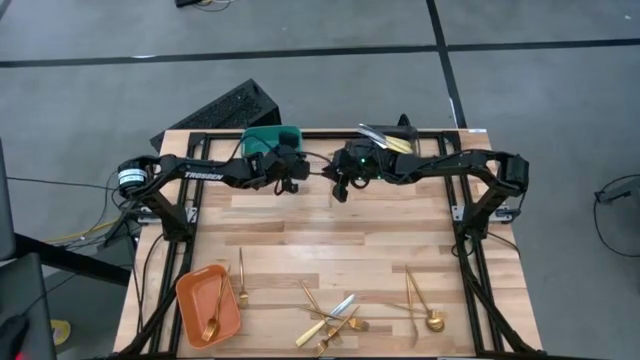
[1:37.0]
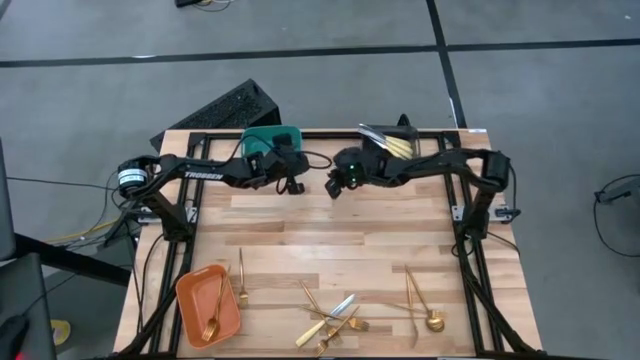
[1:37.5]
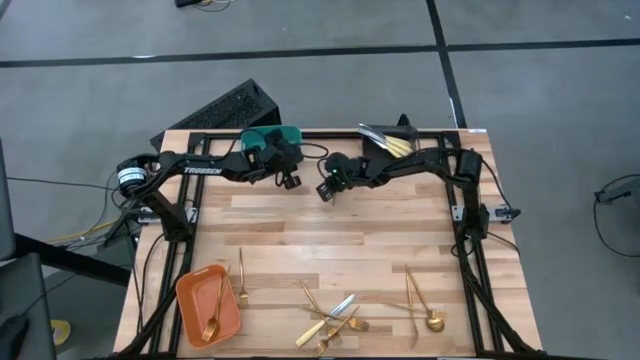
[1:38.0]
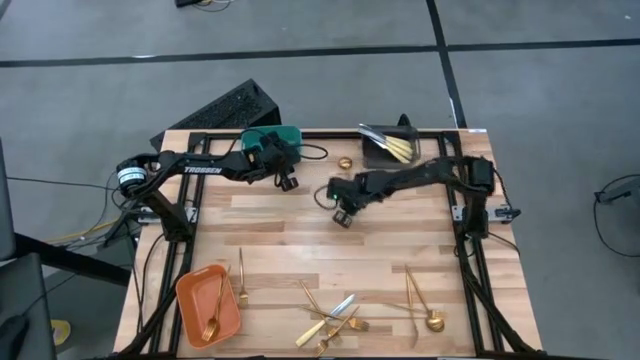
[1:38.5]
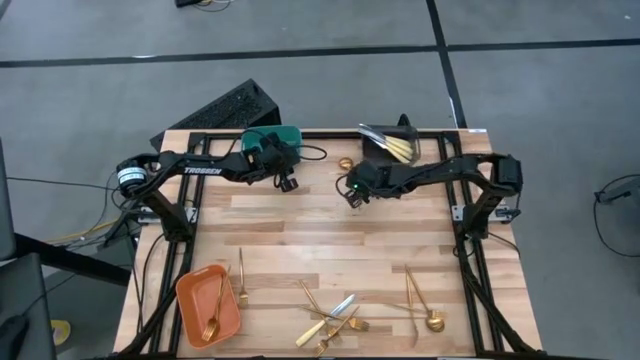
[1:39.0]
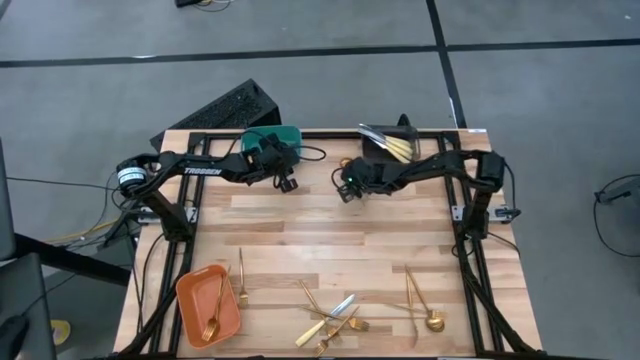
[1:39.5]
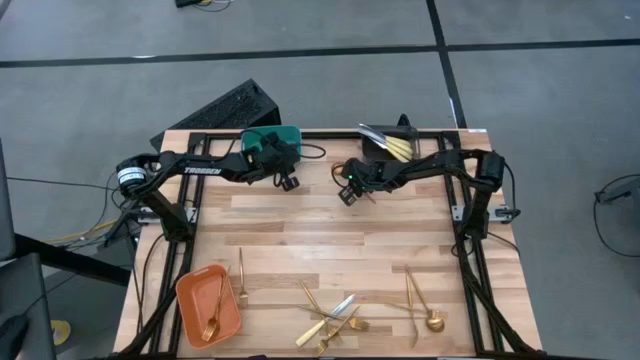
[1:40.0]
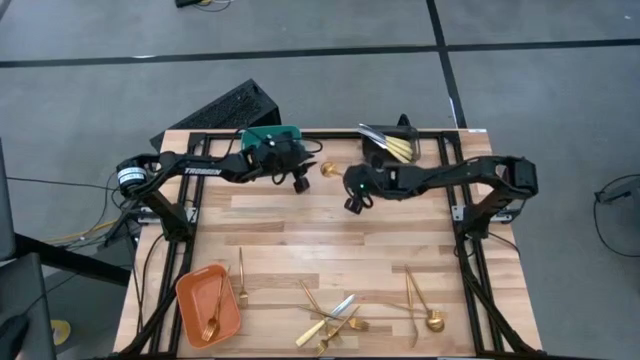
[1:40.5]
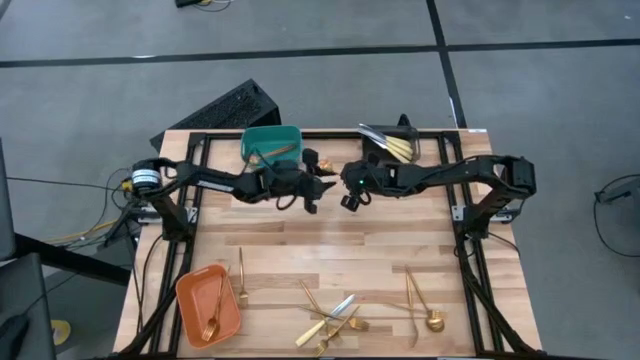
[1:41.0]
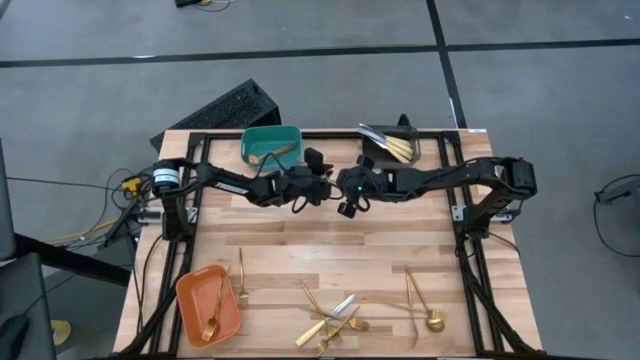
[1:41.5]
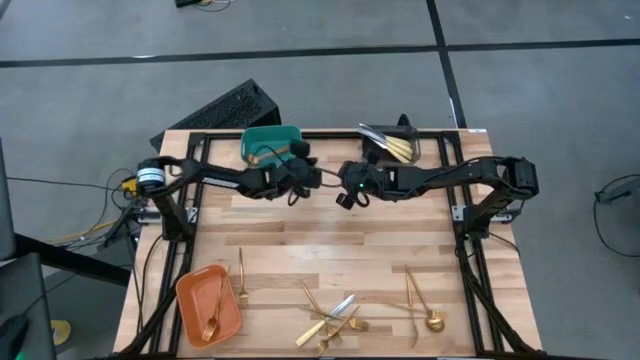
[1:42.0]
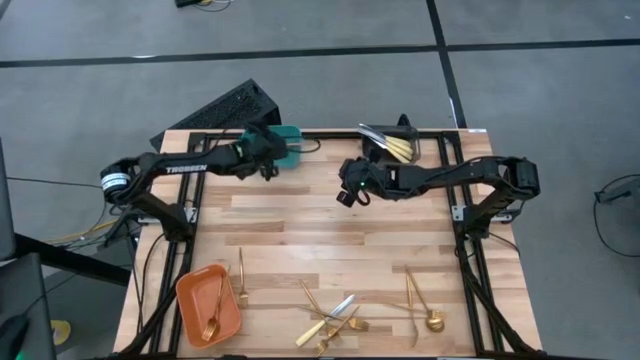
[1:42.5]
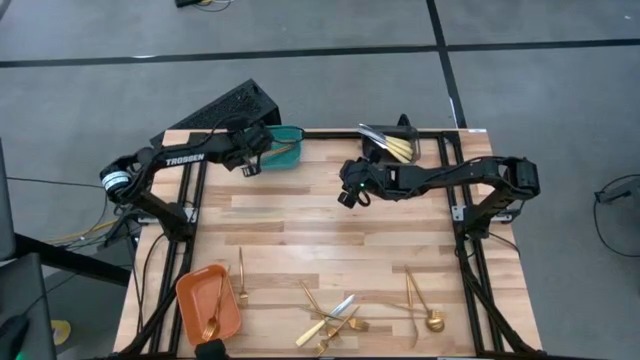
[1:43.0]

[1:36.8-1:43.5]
Task: Sort silverware by color (type)
Put the gold spoon into the green bin

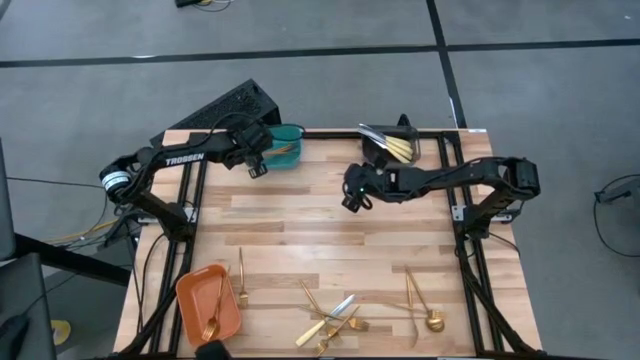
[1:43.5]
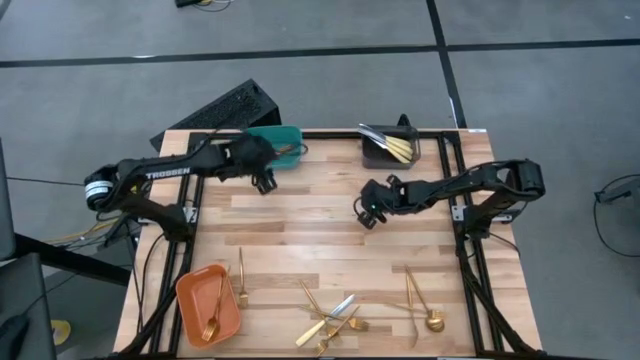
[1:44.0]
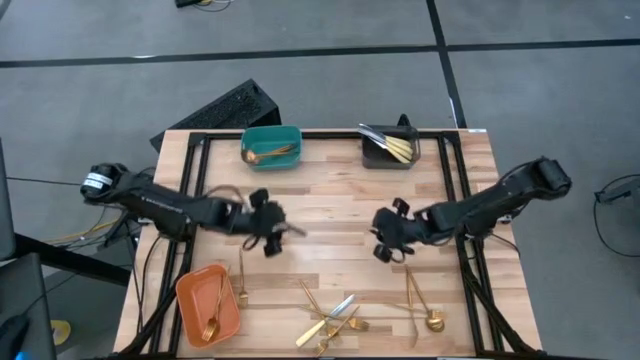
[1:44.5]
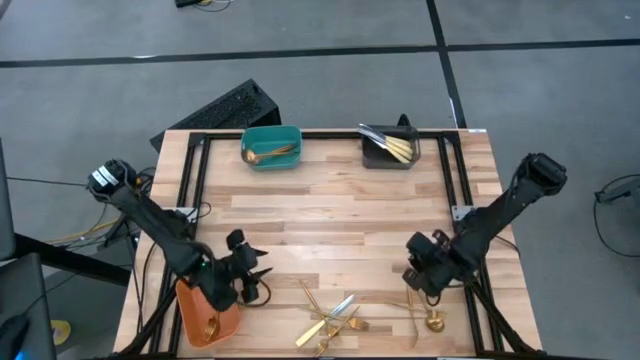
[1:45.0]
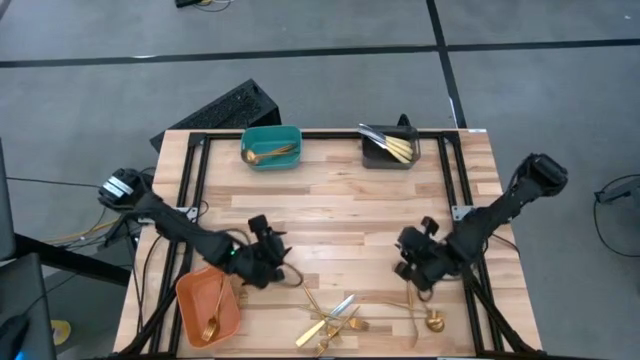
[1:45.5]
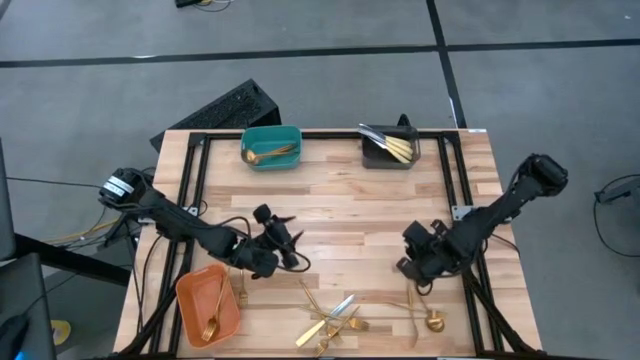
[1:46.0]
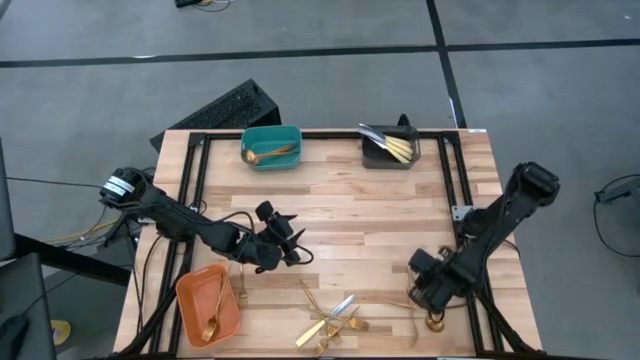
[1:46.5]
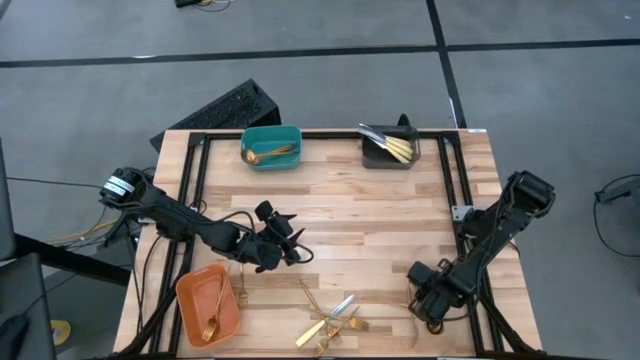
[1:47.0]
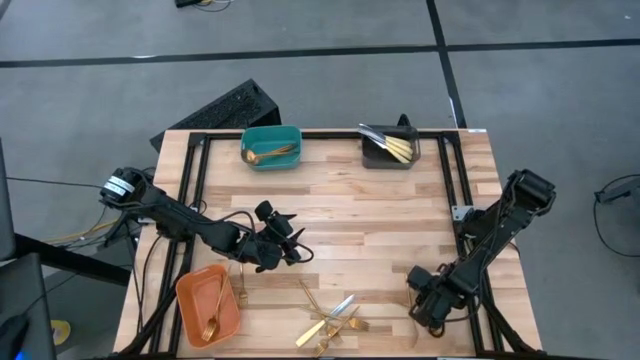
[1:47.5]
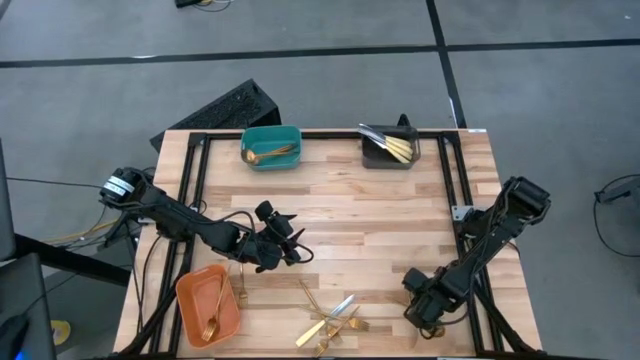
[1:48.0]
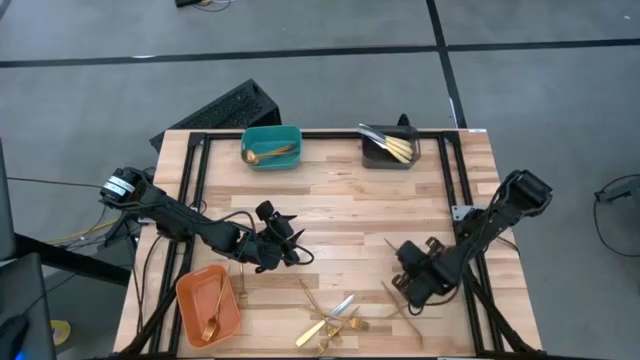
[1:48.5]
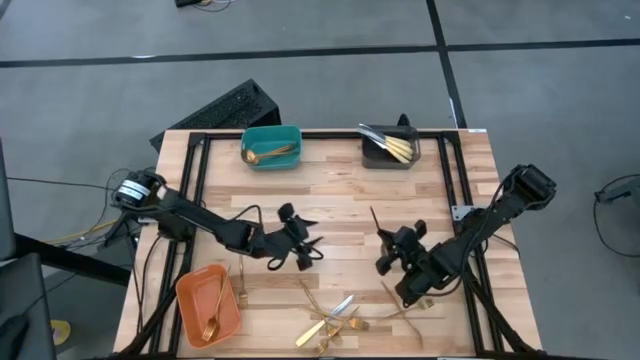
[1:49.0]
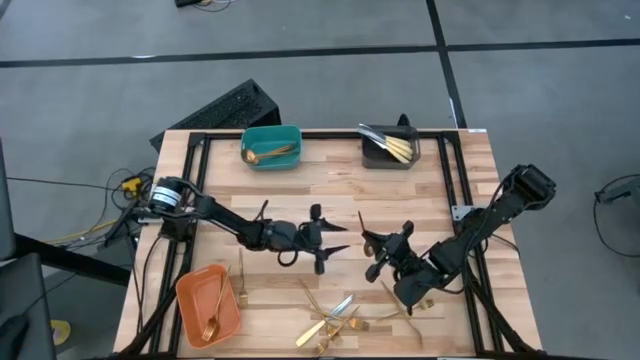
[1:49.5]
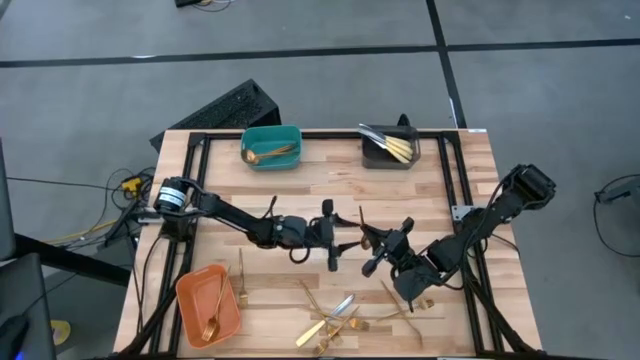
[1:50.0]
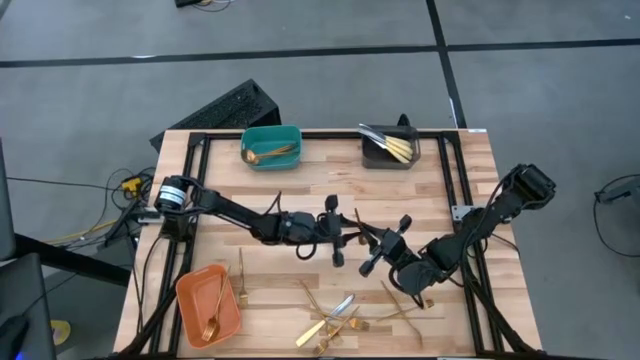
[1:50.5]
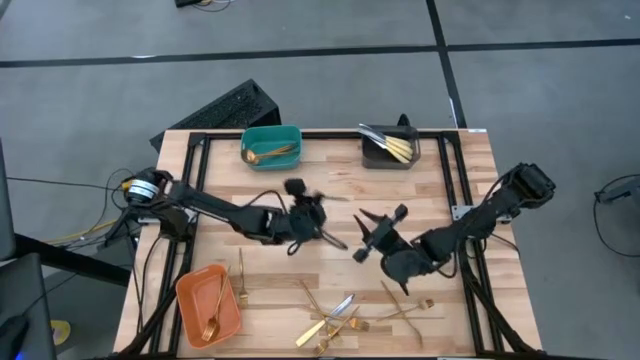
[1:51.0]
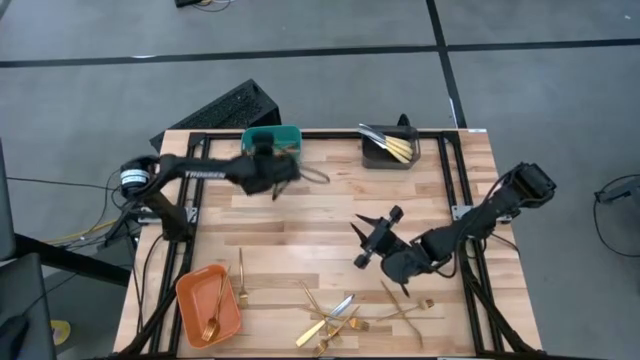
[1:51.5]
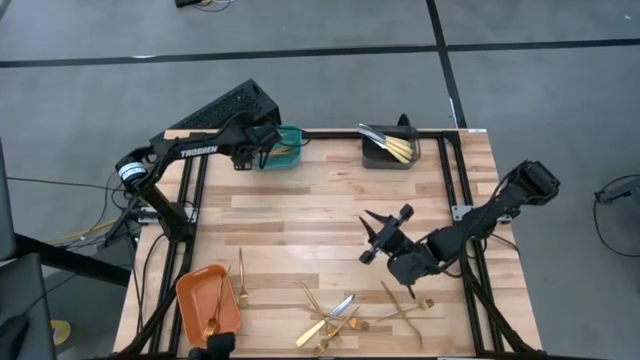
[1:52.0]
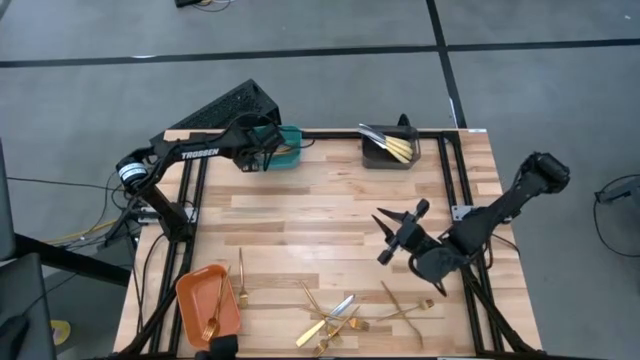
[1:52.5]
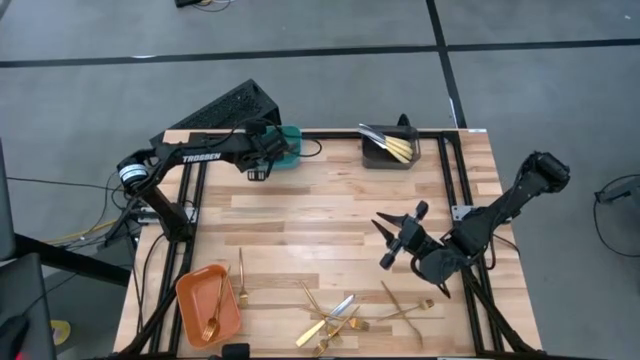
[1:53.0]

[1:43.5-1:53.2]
Put the gold spoon into the green bin

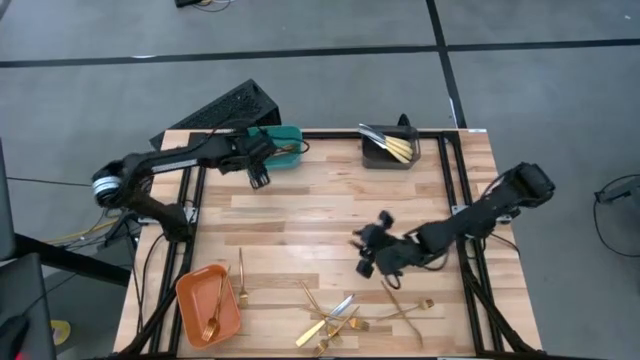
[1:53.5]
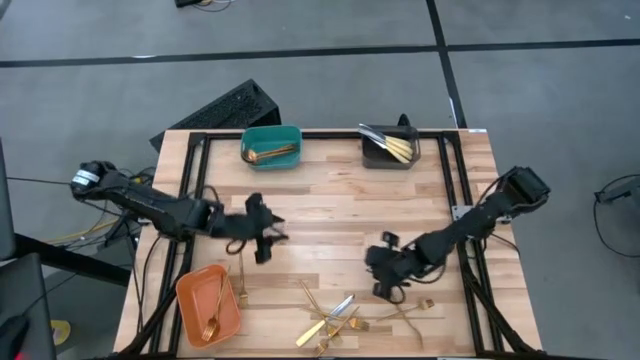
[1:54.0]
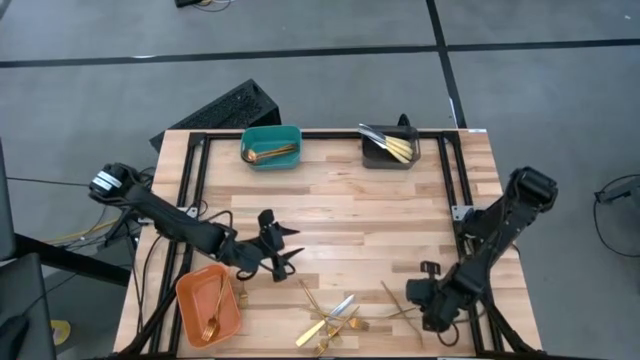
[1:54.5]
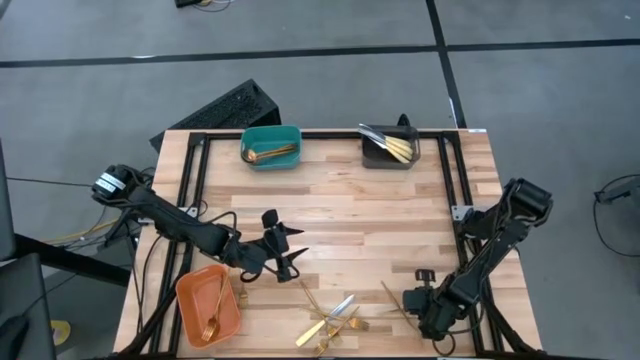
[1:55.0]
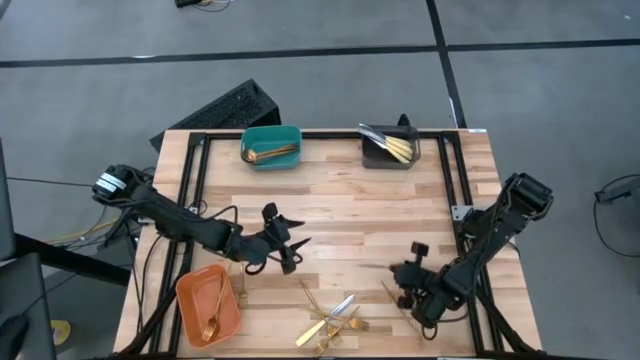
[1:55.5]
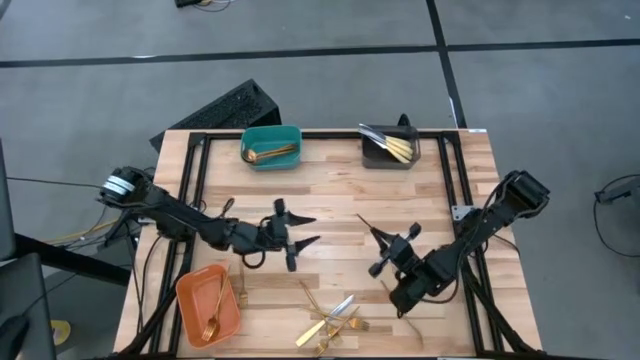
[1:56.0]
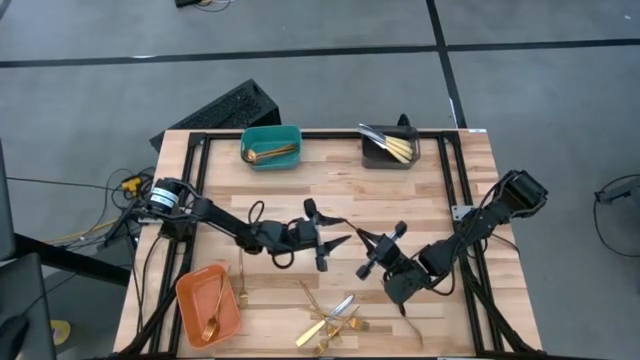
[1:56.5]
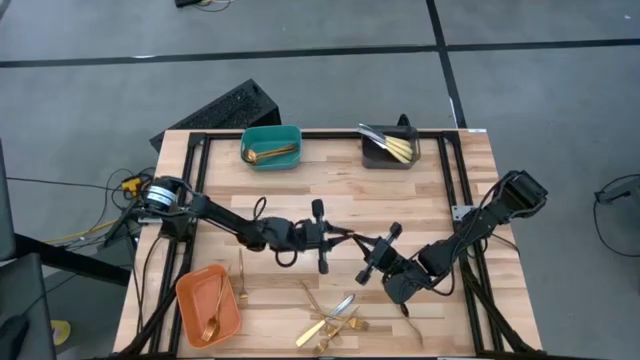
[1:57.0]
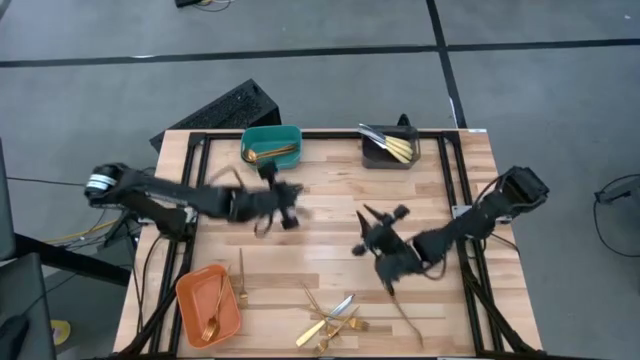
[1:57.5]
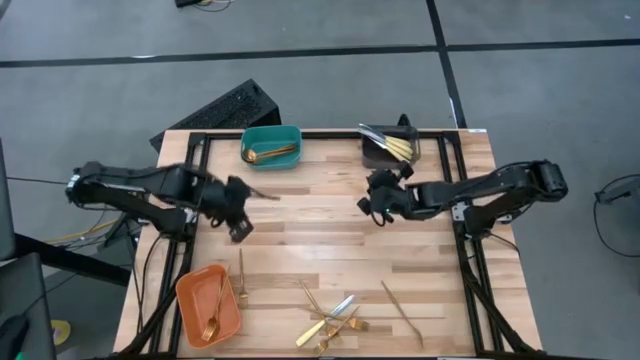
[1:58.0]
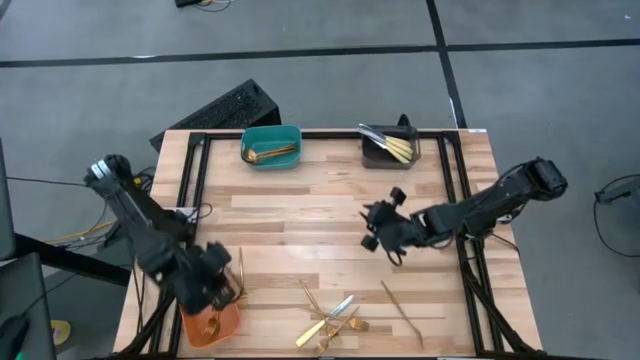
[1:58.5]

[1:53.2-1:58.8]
Put the gold fork into the orange bin
